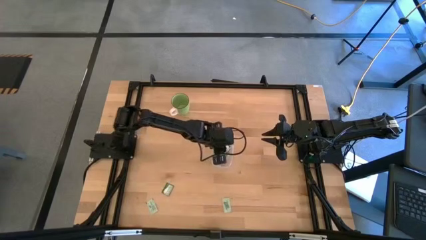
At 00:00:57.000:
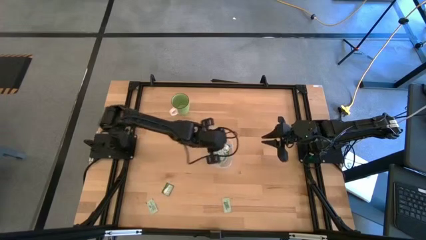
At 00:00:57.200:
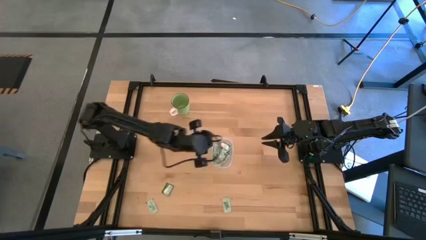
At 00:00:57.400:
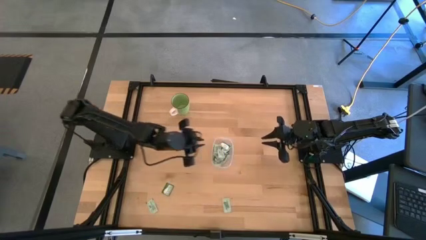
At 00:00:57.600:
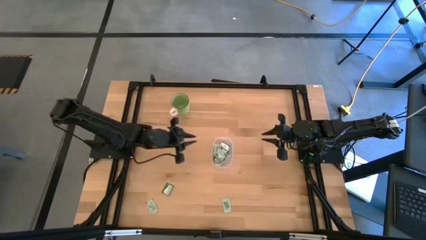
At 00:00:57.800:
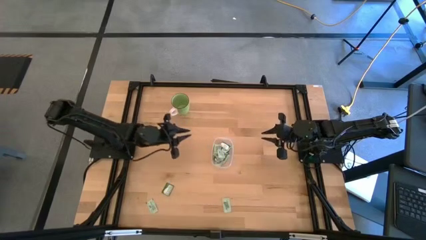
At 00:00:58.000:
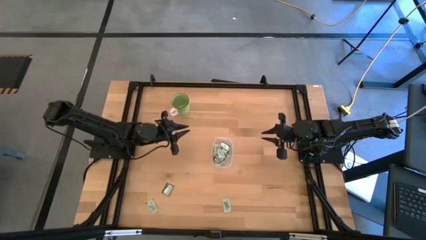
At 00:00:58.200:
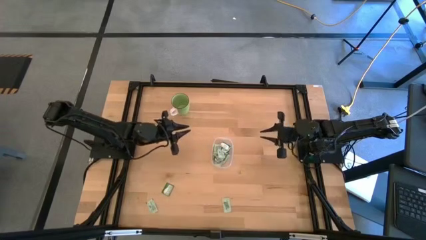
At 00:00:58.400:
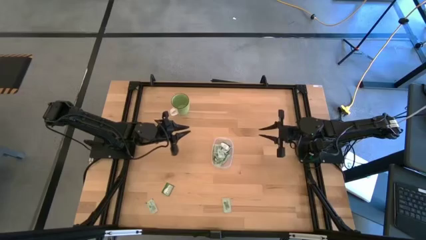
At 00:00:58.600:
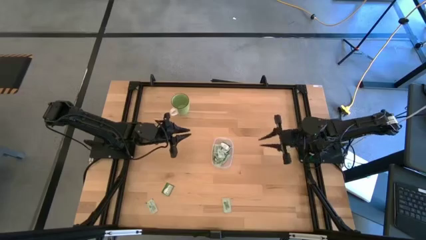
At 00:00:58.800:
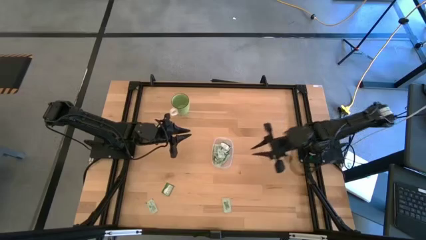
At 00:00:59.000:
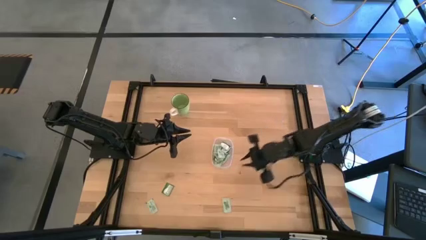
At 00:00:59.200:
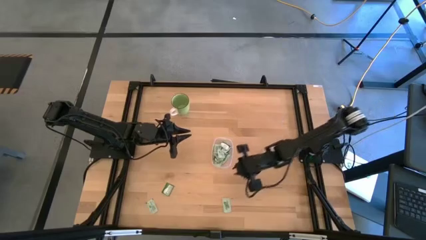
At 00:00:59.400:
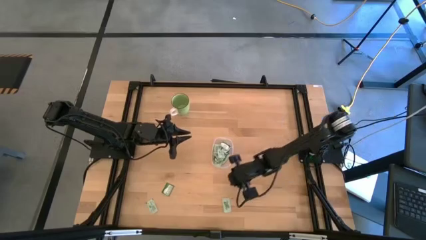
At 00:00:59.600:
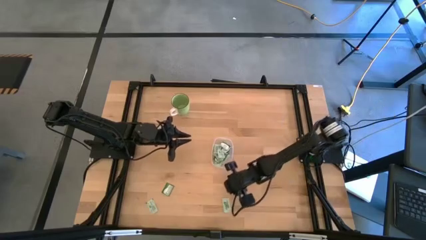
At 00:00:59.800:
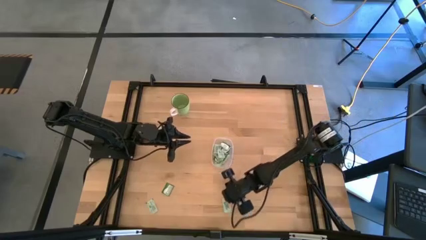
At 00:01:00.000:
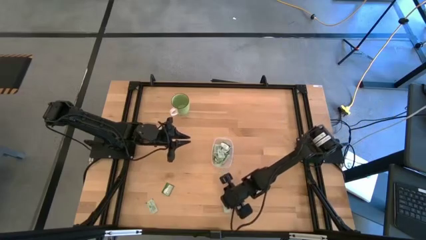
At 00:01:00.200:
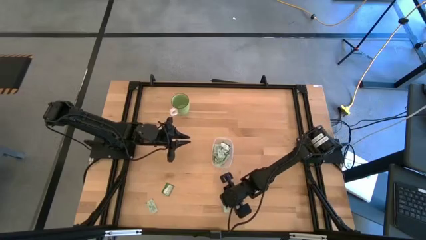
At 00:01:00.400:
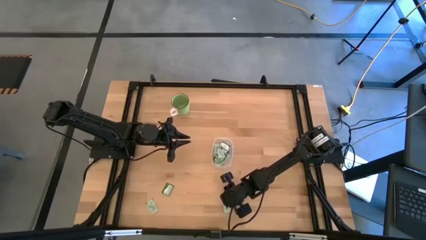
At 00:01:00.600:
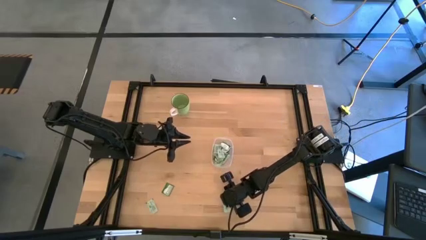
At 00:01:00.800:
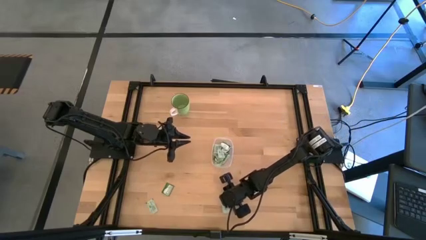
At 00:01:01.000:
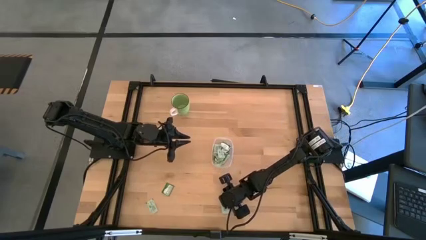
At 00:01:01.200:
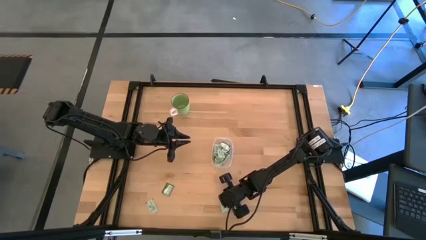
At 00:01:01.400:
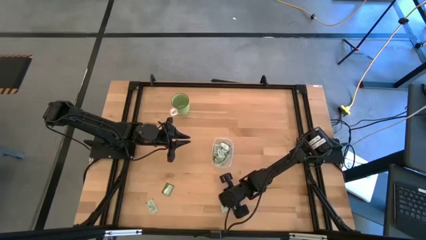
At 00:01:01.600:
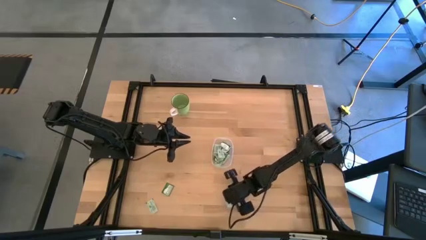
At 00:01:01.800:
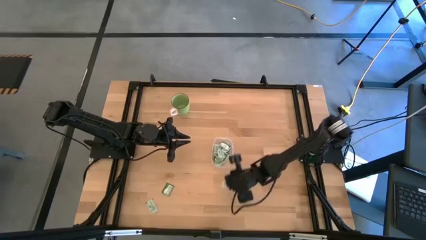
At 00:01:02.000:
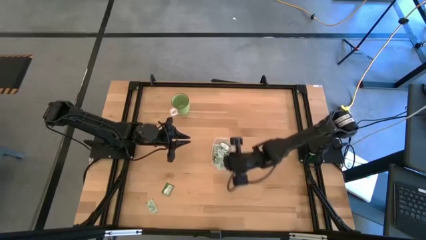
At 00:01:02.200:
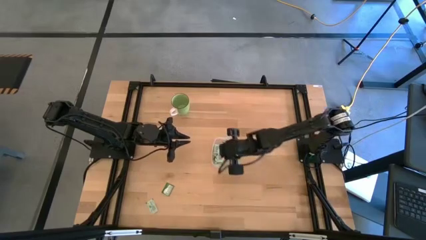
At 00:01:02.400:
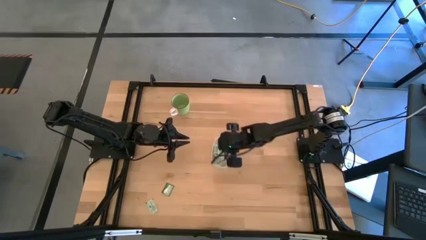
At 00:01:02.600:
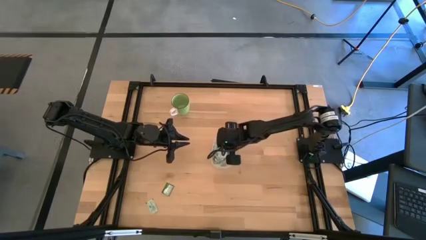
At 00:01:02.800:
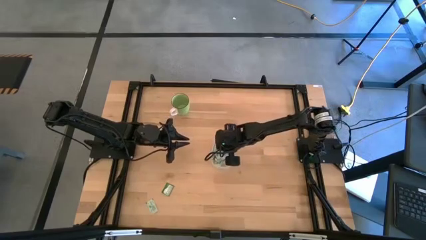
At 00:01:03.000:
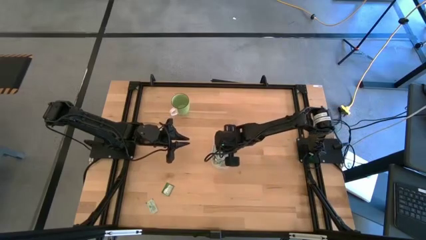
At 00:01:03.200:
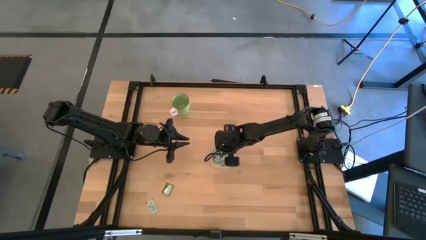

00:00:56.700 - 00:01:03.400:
Task: Pick and place items into bin
Put the stevia packet into the transparent bin

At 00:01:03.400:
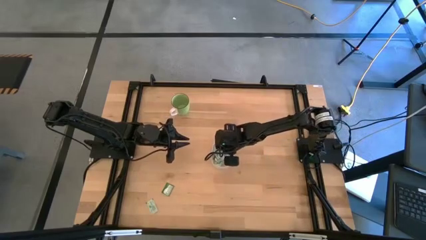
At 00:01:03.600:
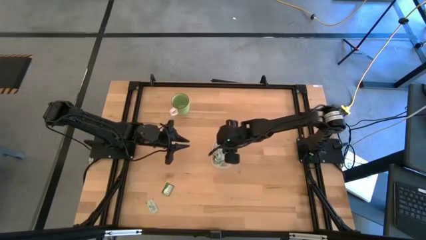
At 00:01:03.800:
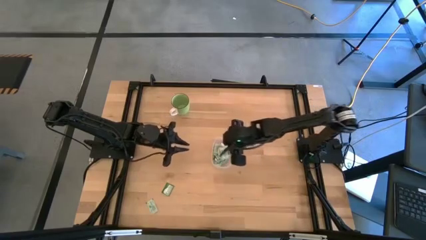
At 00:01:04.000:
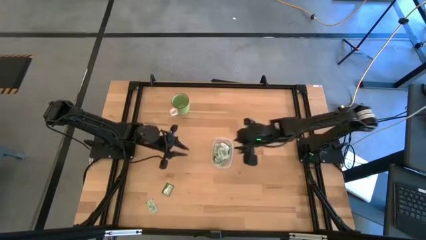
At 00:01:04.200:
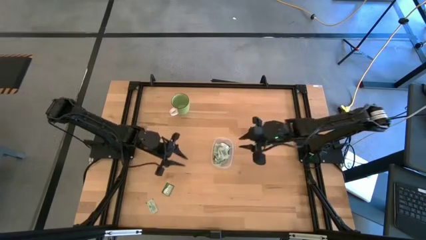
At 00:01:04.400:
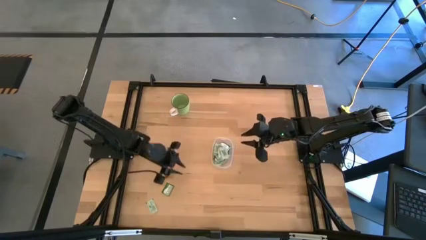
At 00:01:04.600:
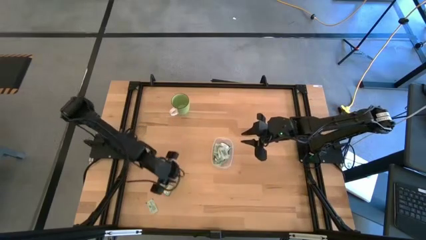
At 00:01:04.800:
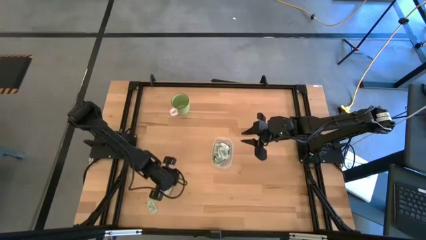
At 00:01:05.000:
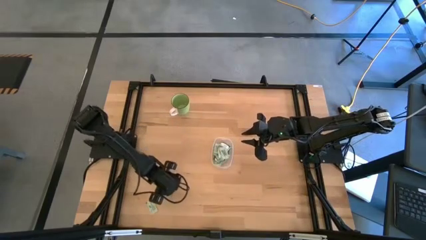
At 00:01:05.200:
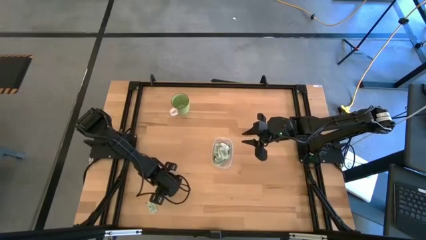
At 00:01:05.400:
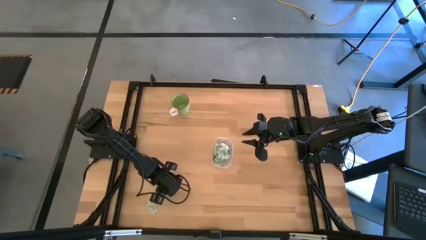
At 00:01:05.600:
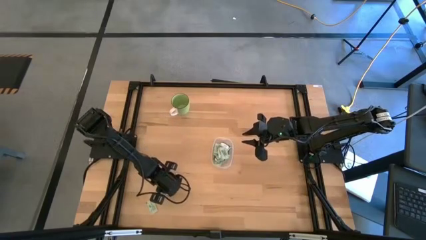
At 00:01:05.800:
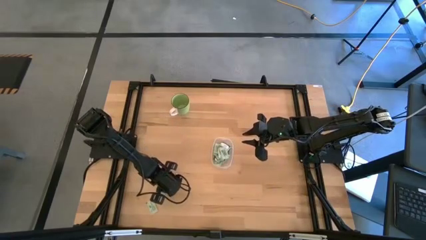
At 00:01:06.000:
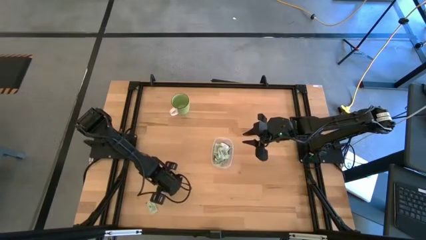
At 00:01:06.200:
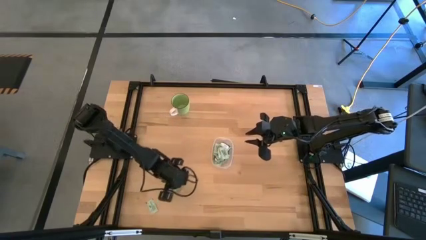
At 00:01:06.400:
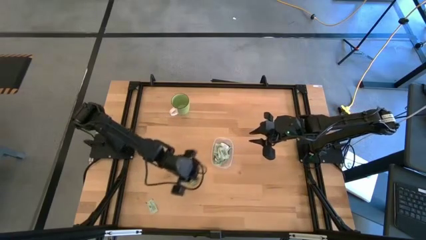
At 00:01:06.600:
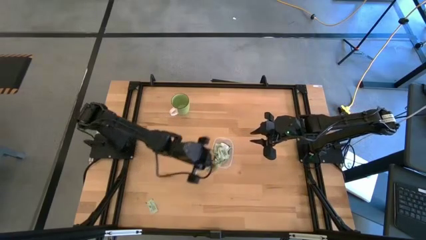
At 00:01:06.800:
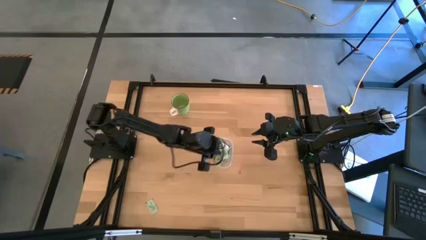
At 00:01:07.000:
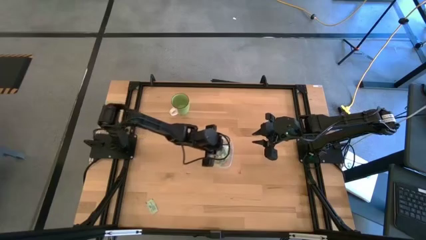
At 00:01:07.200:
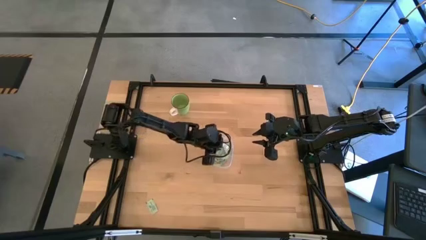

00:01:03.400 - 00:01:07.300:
Put the stevia packet into the transparent bin

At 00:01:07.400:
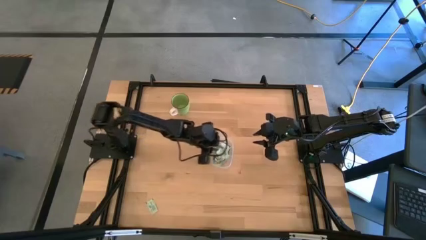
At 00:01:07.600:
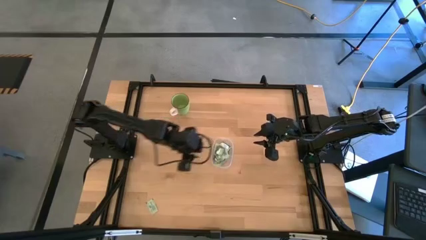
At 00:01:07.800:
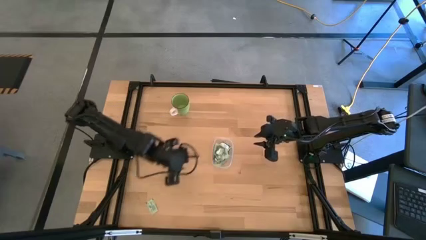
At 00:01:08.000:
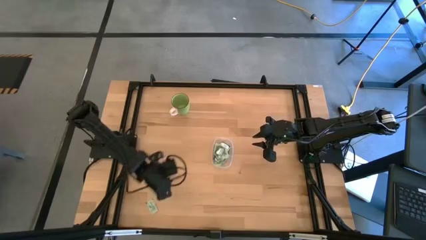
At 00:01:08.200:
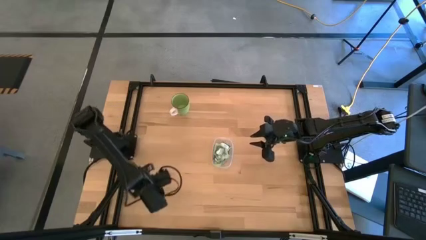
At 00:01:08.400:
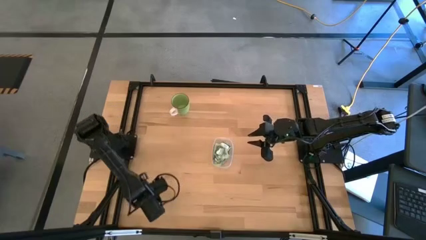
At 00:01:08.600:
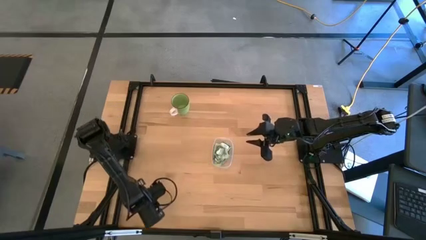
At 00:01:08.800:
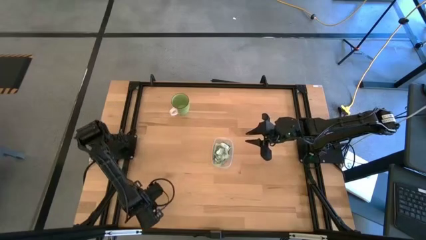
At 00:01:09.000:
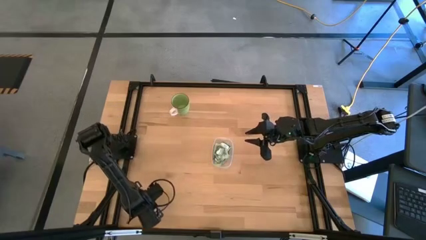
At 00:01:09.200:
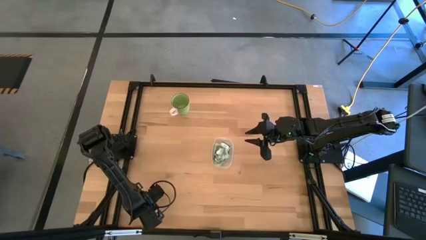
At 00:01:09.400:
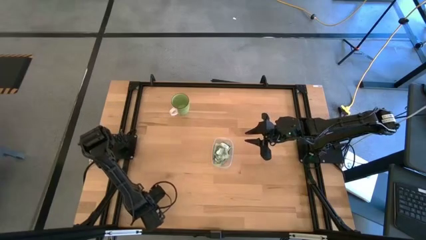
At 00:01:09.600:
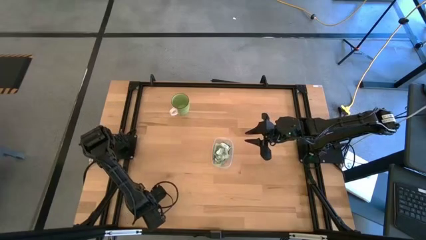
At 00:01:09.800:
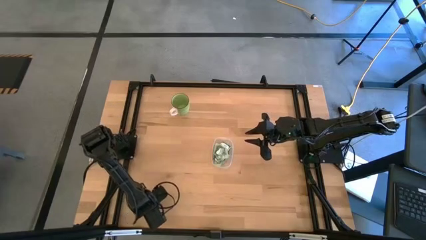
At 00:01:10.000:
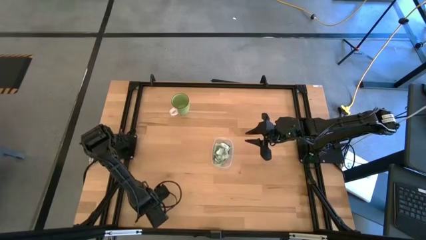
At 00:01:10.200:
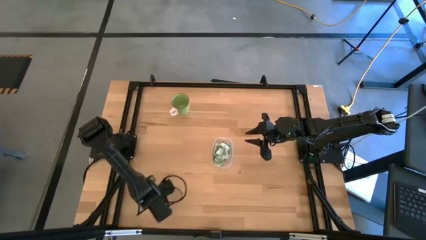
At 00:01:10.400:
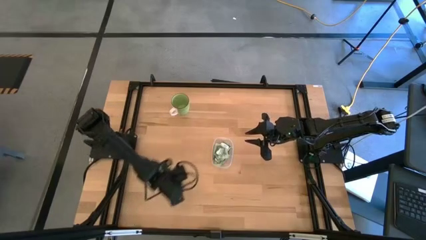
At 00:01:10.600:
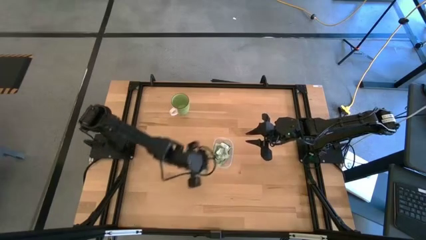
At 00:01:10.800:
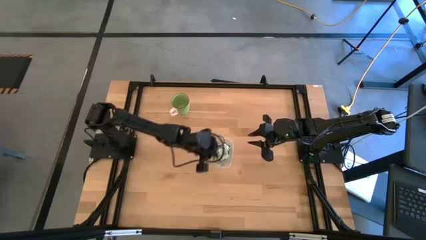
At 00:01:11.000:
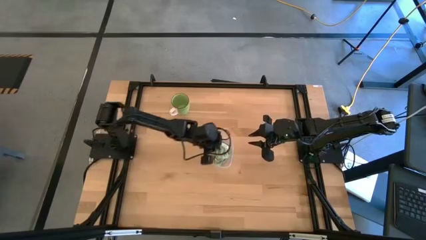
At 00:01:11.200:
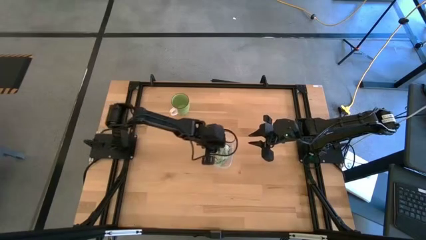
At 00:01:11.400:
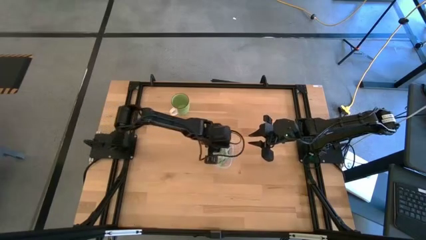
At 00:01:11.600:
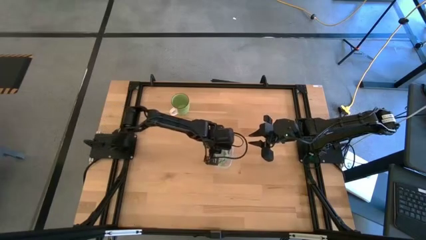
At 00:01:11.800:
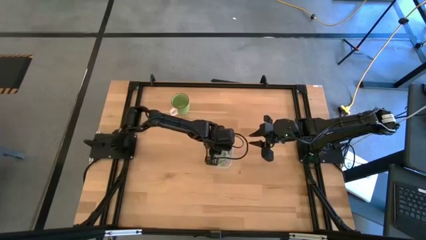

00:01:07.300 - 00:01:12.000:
Put the stevia packet into the transparent bin

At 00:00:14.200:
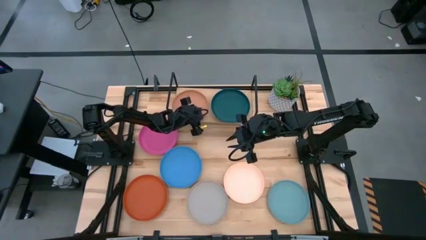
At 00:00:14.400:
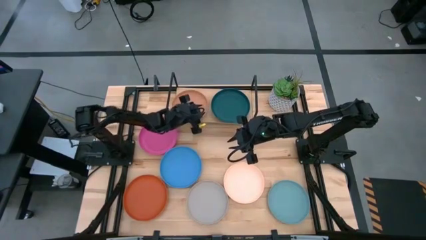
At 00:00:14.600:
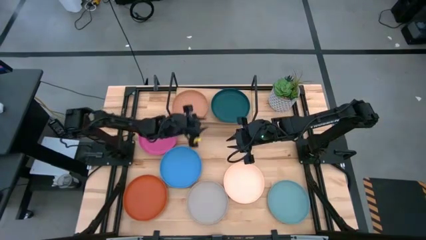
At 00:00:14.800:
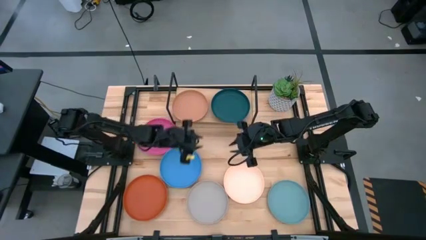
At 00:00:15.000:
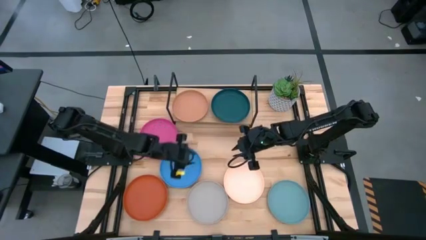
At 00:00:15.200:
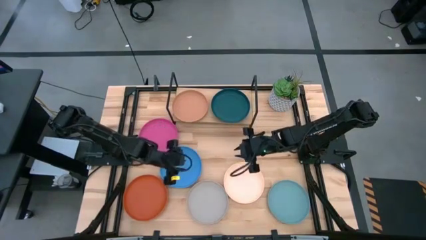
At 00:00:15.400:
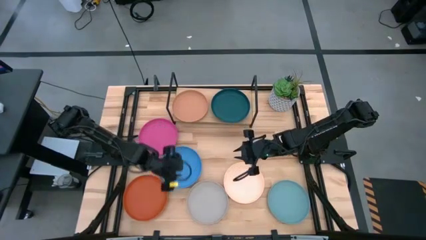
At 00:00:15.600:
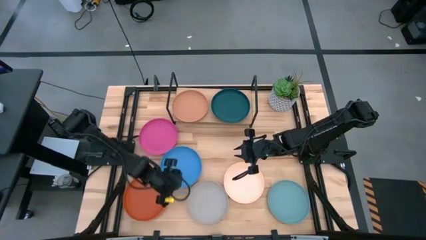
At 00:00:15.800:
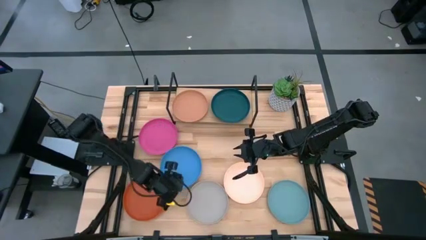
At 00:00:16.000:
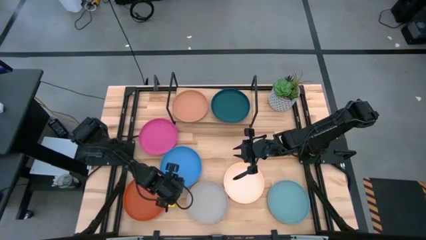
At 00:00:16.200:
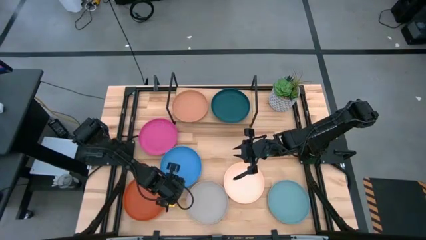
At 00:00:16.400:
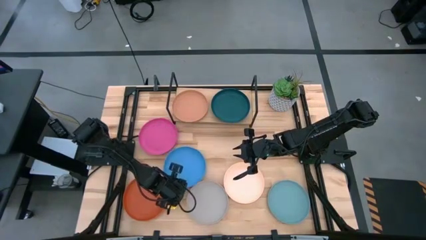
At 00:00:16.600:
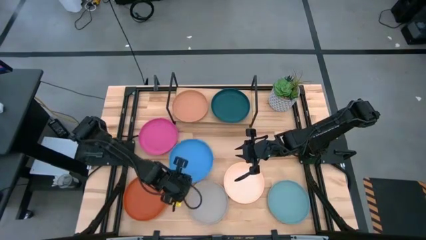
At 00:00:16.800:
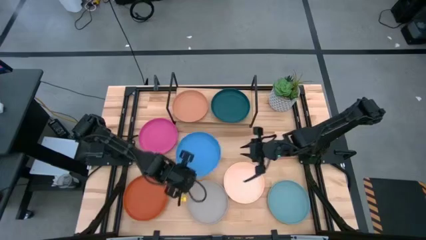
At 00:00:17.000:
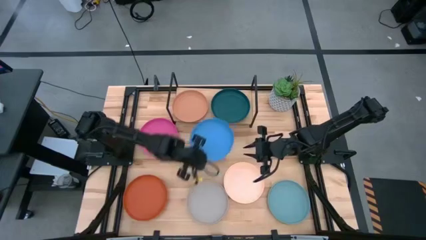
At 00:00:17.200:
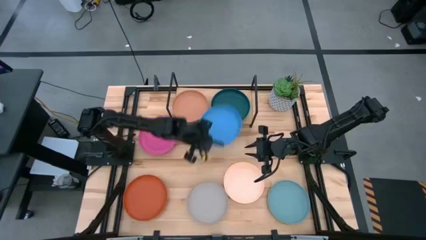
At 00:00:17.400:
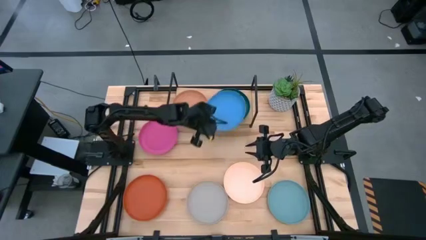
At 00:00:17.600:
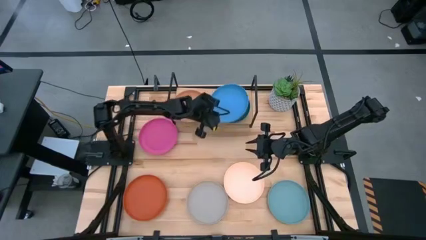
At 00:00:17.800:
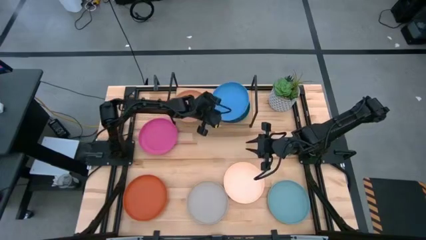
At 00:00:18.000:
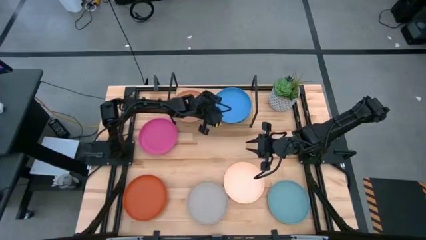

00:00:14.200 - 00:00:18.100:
Task: Place and stack plates onto a shelf
Stack the blue plate on top of the dark blue plate on the shelf
